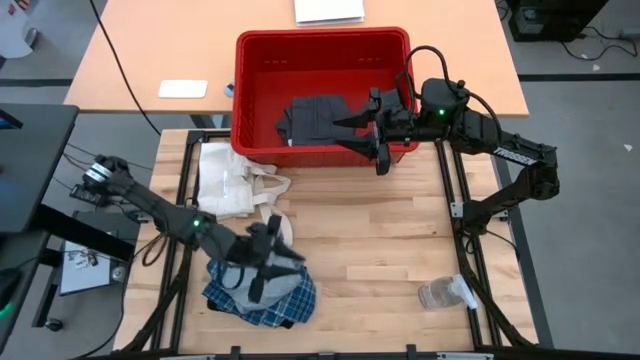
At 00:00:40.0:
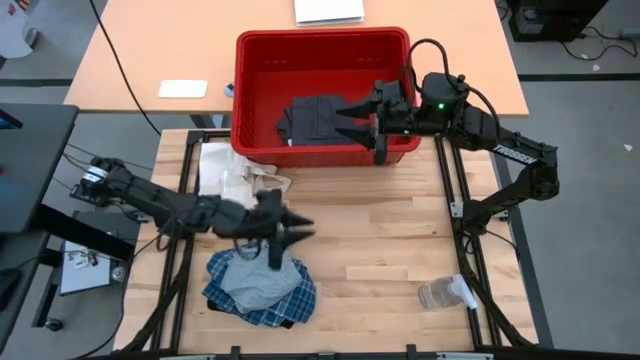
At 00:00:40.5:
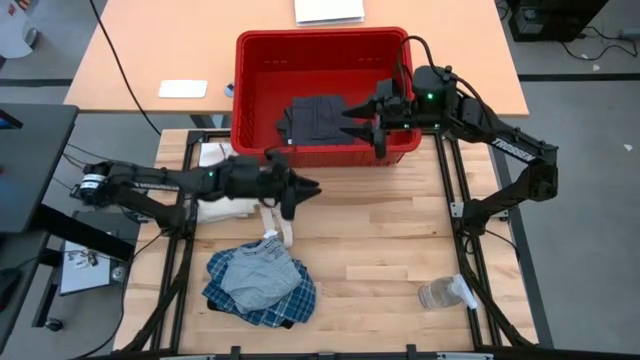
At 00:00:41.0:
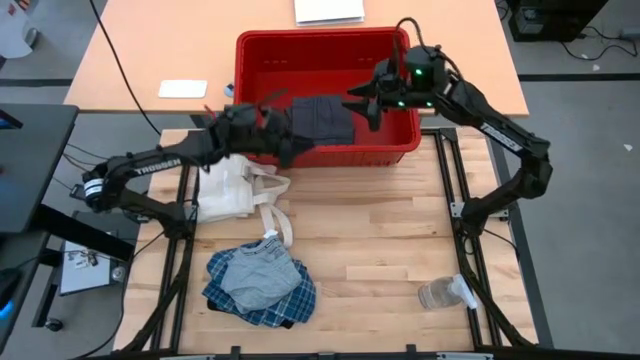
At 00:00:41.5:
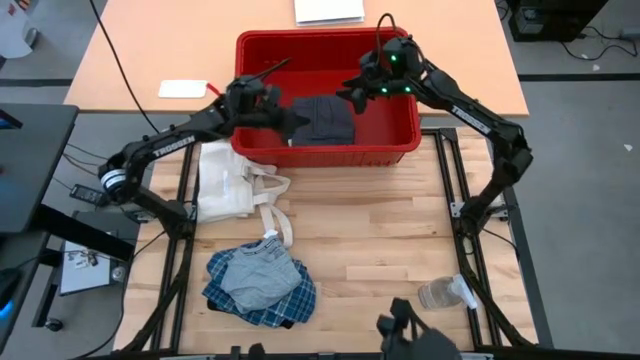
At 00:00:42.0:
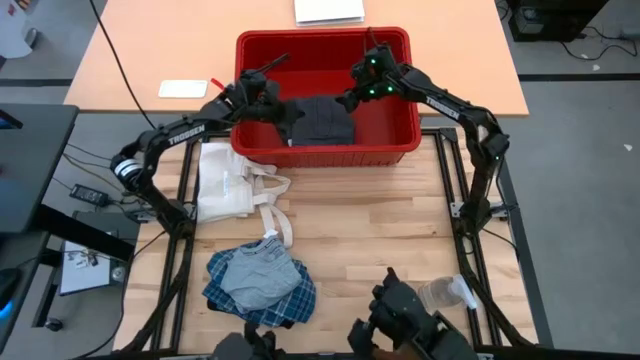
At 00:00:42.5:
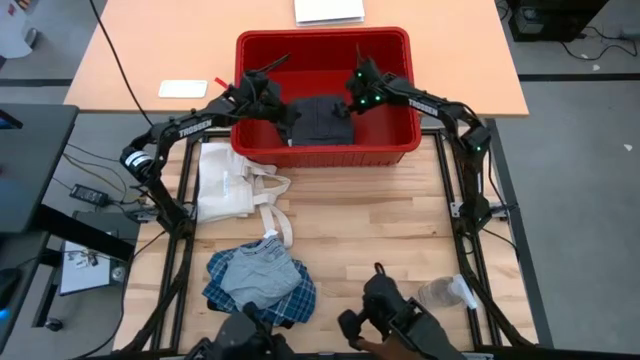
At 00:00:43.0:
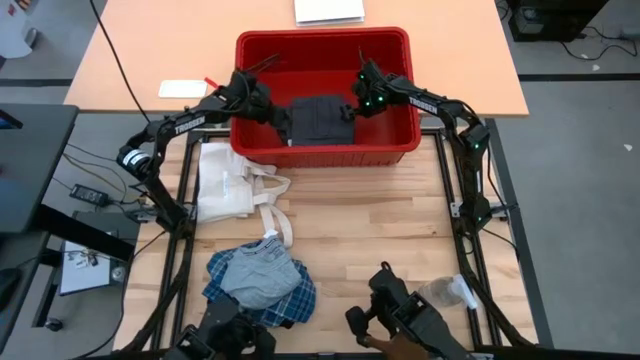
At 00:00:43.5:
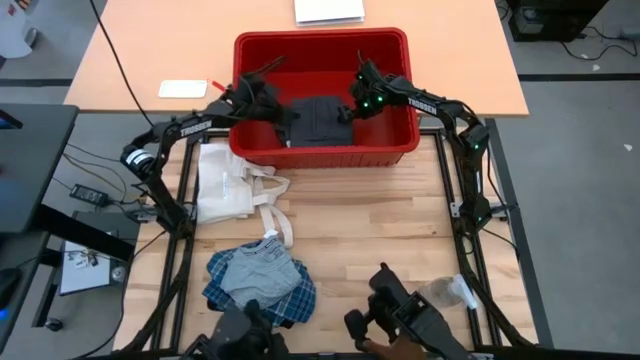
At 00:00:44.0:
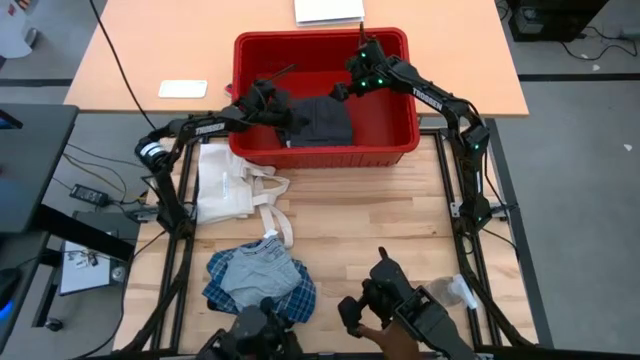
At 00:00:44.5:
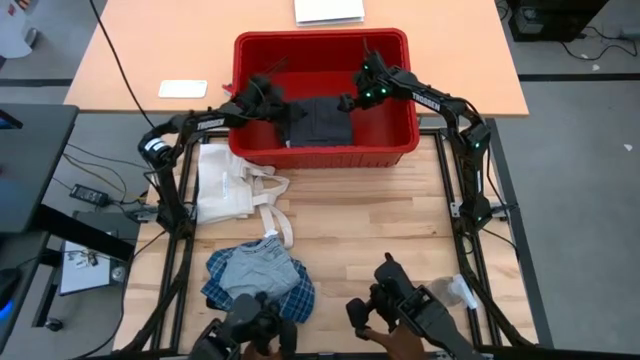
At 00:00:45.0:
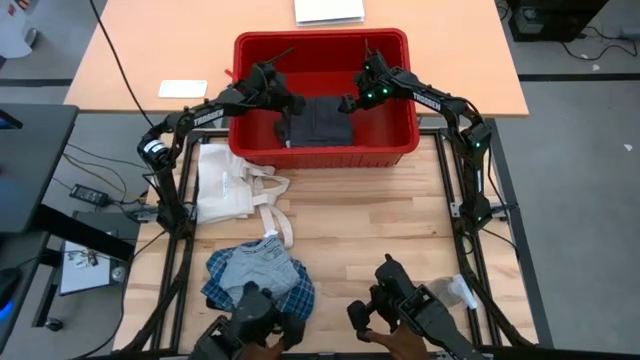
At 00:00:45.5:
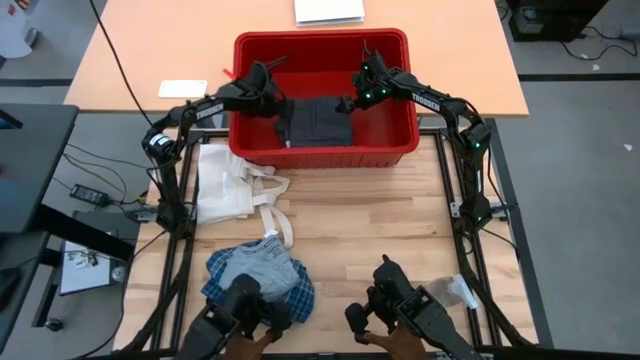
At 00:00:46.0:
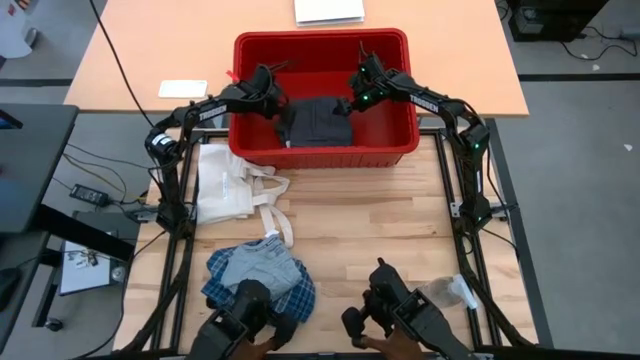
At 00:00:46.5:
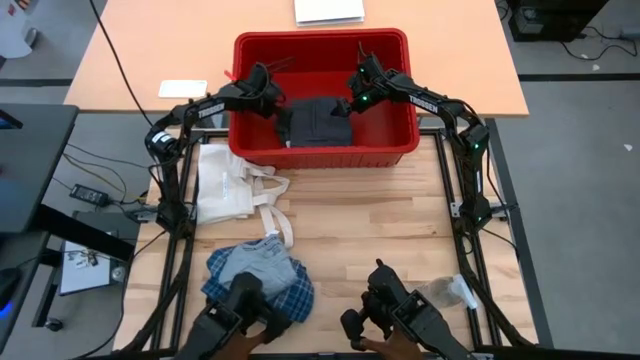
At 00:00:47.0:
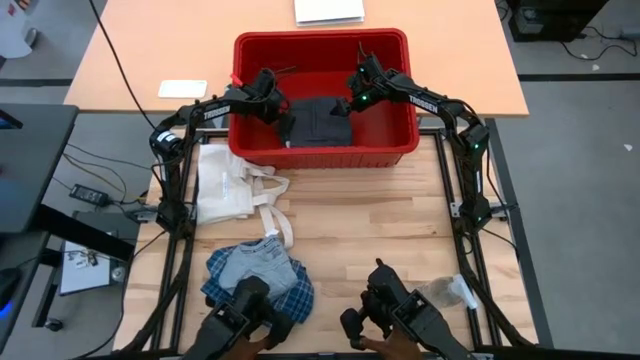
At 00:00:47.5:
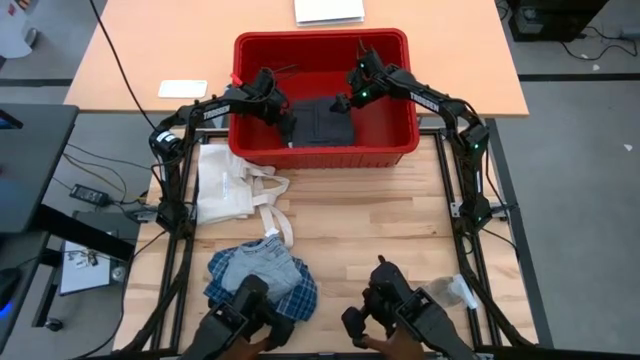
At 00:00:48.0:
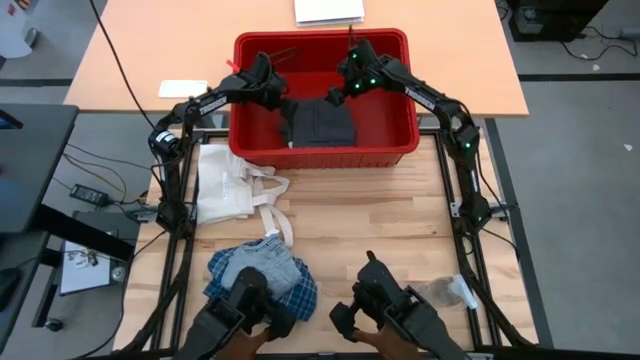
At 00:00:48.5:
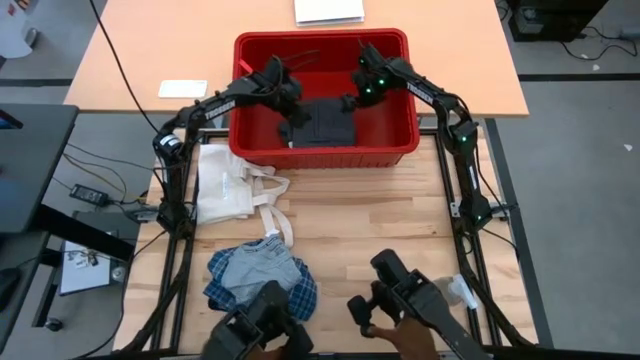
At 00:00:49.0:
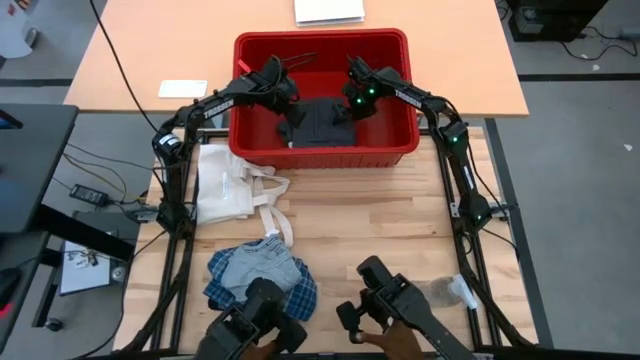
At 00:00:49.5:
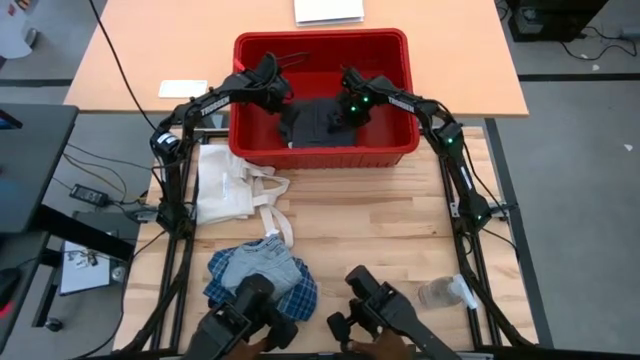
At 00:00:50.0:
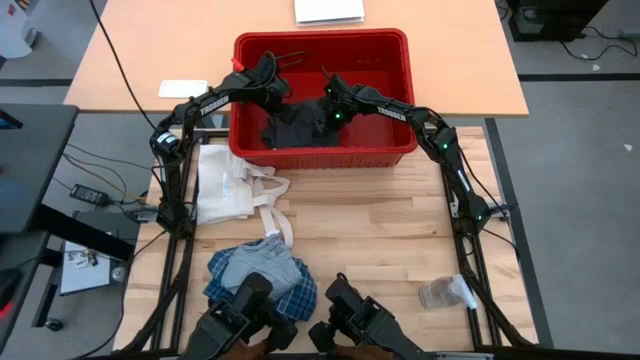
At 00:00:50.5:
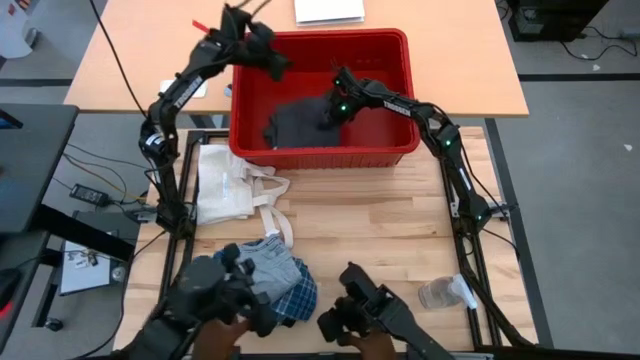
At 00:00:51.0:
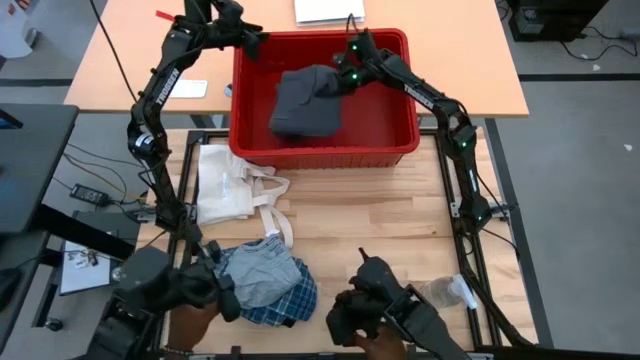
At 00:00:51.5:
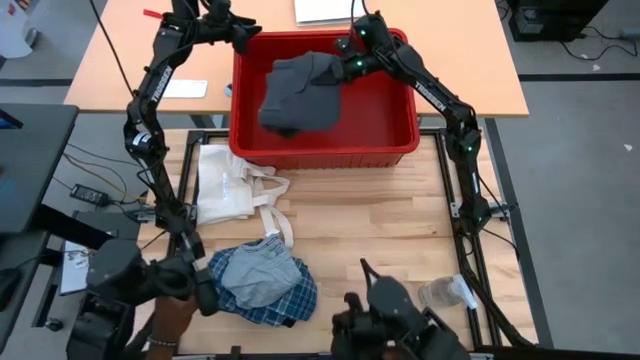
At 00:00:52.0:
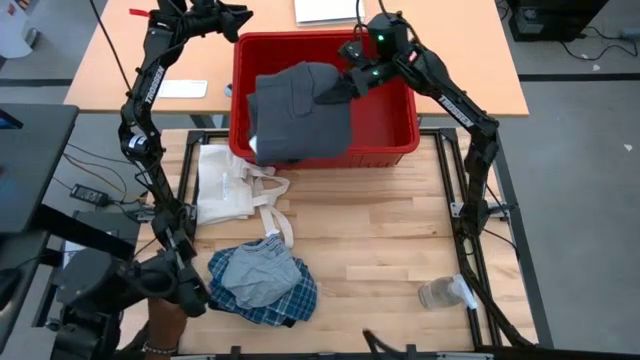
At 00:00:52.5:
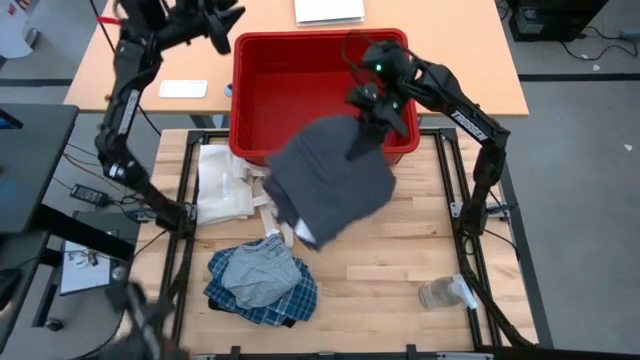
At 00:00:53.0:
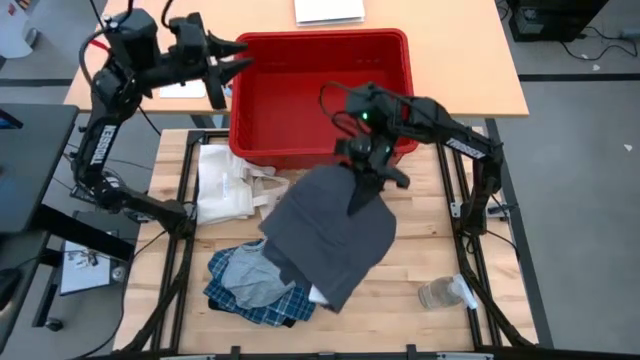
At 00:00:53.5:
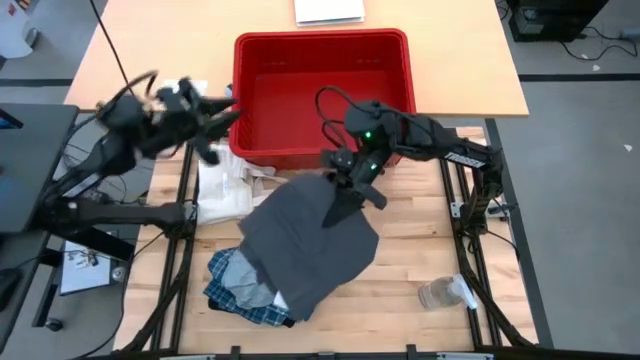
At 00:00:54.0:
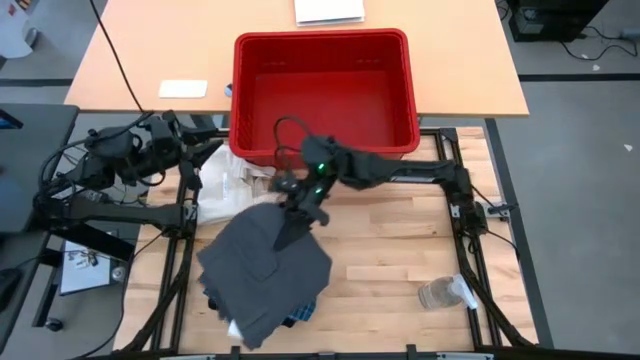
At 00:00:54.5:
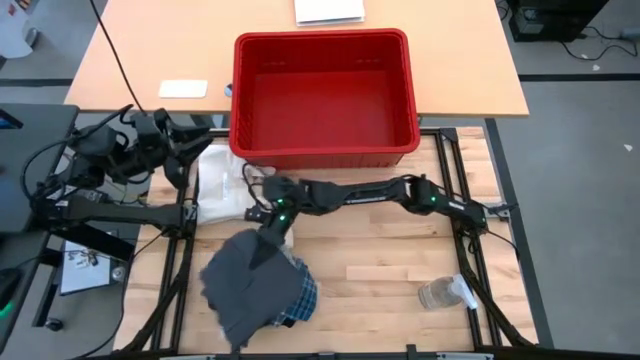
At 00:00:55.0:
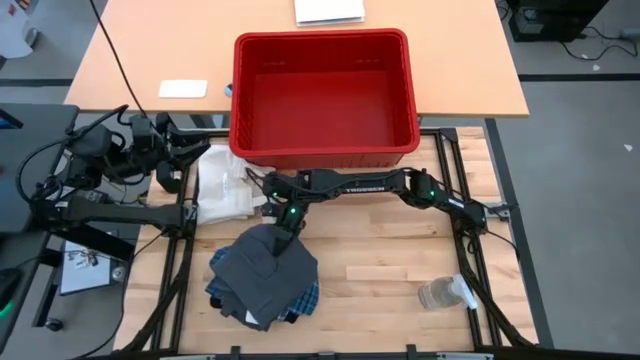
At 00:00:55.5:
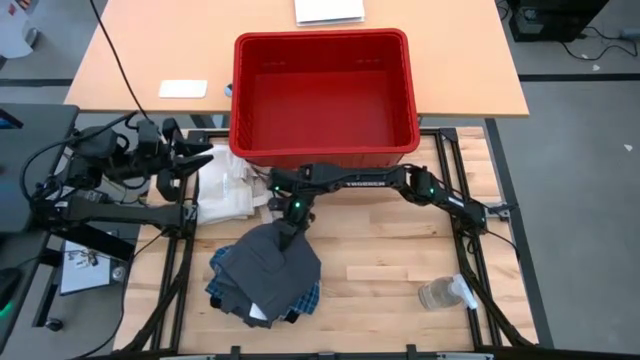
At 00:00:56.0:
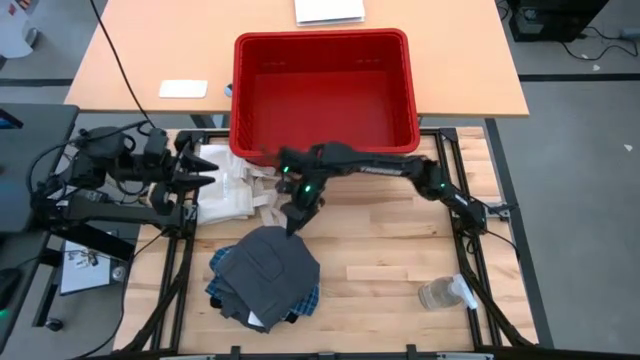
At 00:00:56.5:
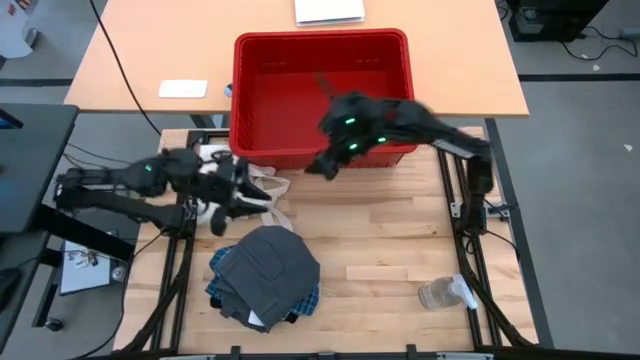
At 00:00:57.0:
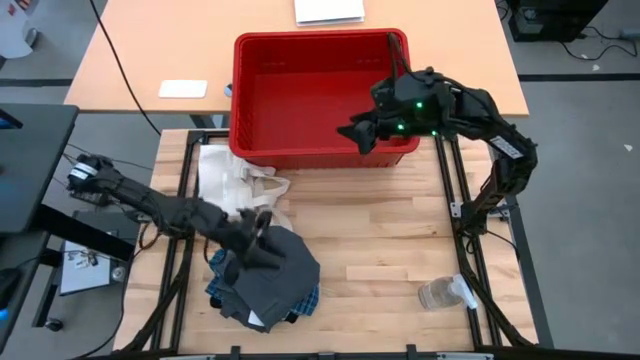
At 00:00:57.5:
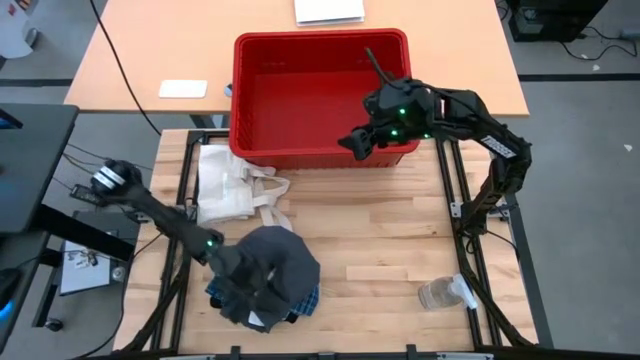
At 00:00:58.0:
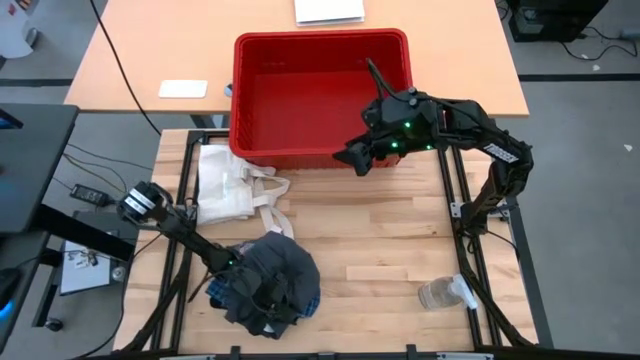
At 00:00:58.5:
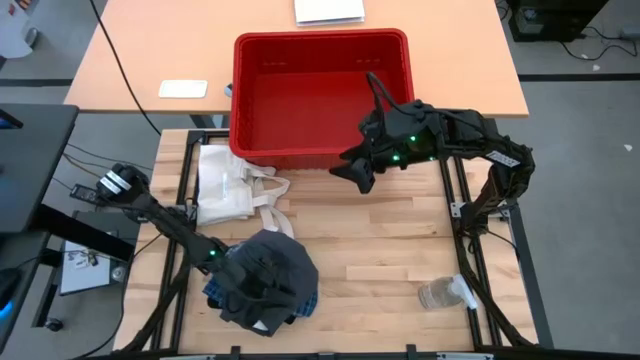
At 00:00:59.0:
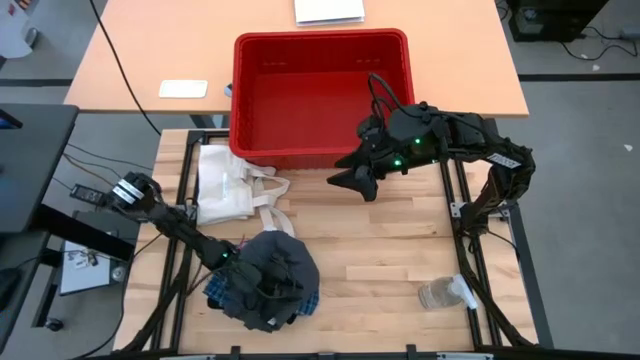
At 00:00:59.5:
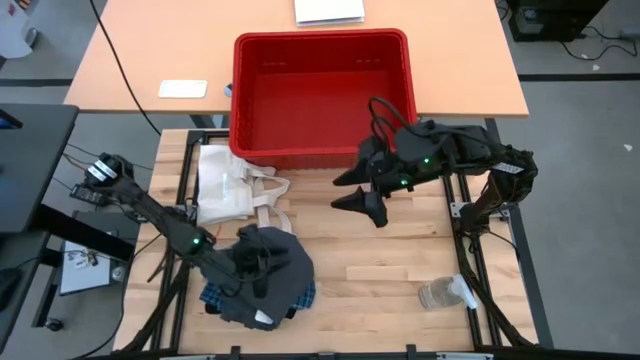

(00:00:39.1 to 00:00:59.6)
Task: Fold laundry
Remove the gray shorts from the red bin
